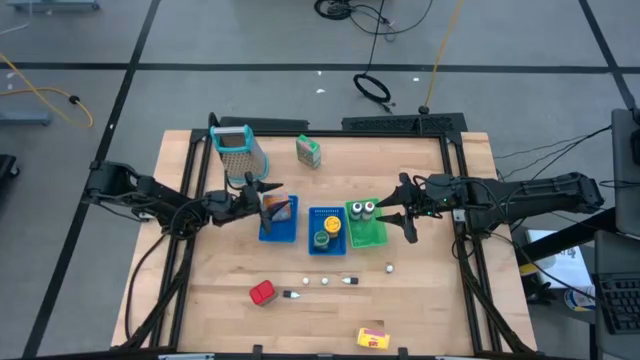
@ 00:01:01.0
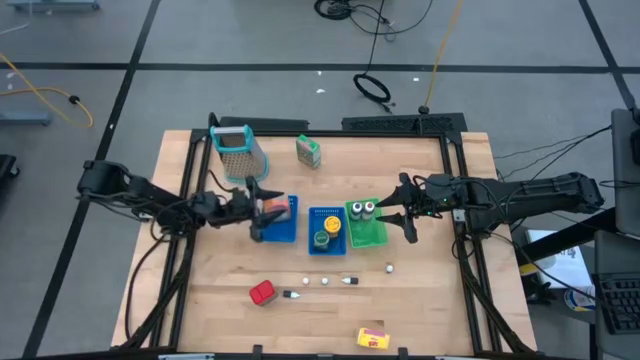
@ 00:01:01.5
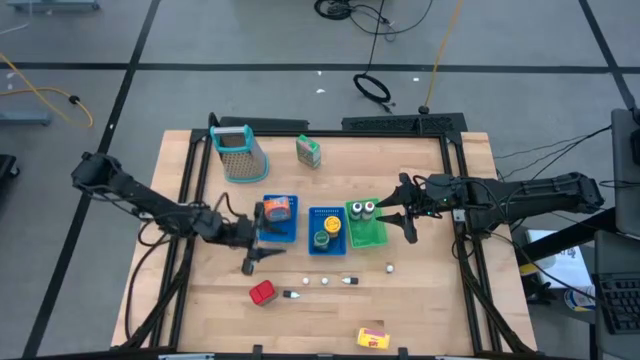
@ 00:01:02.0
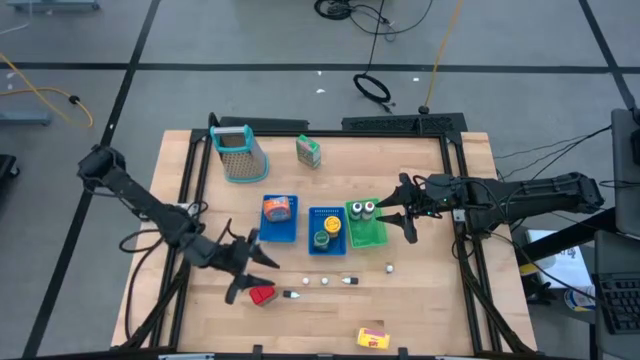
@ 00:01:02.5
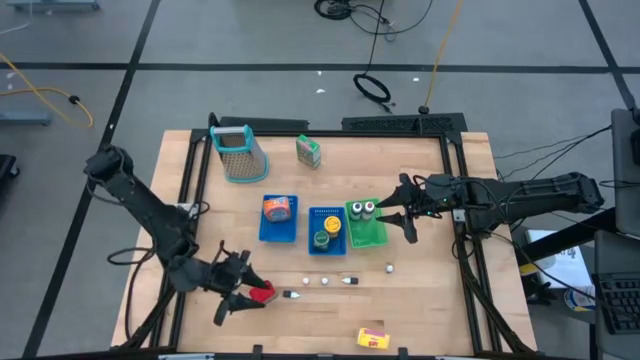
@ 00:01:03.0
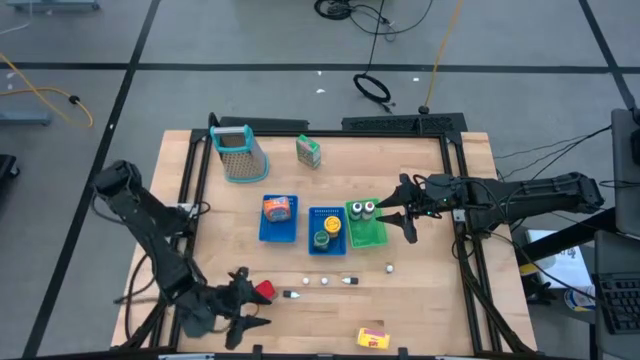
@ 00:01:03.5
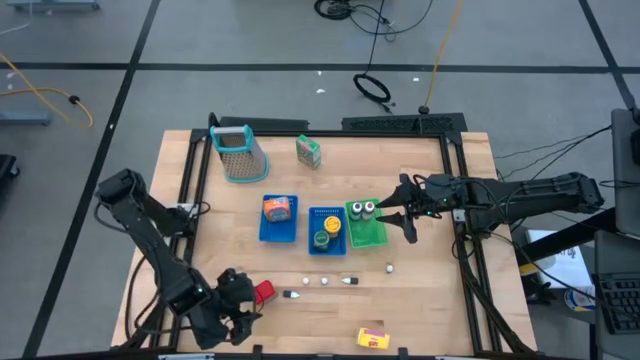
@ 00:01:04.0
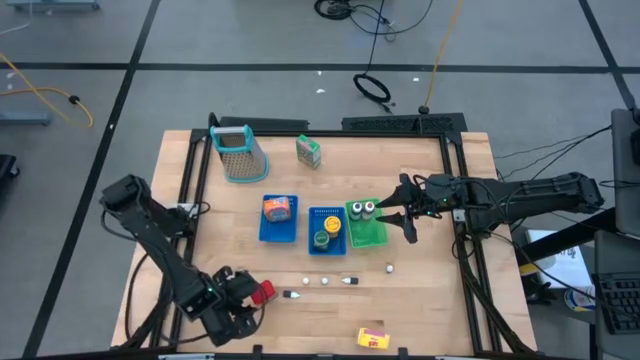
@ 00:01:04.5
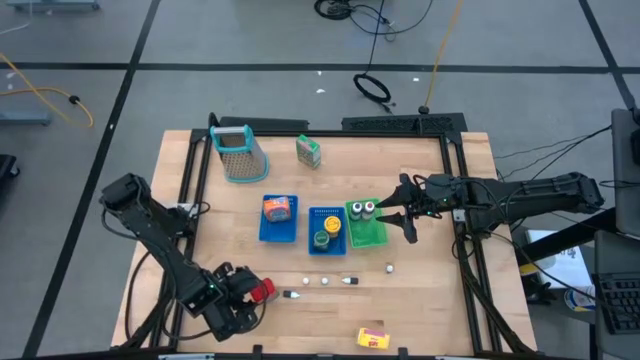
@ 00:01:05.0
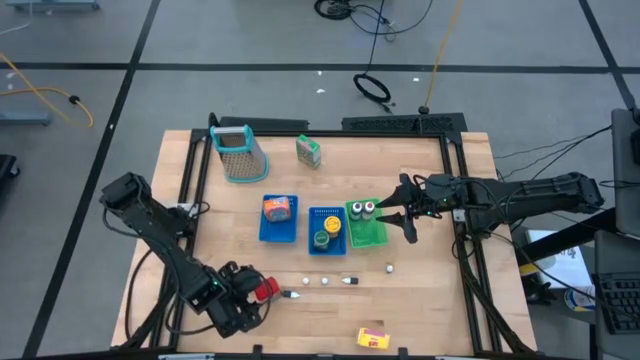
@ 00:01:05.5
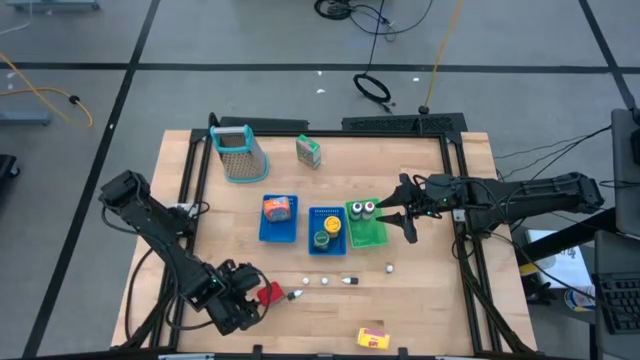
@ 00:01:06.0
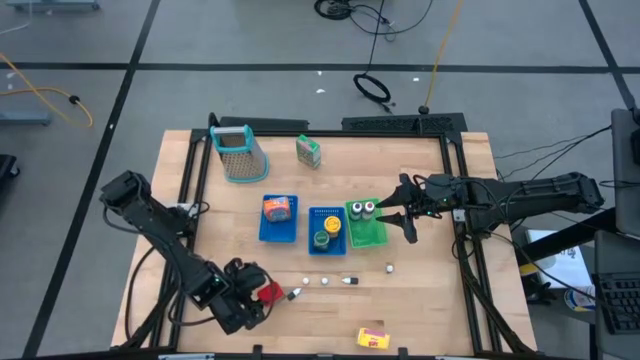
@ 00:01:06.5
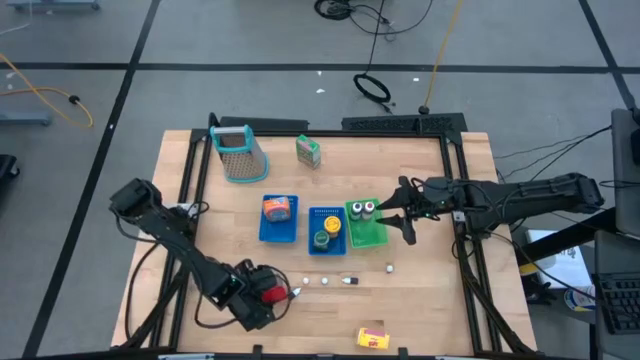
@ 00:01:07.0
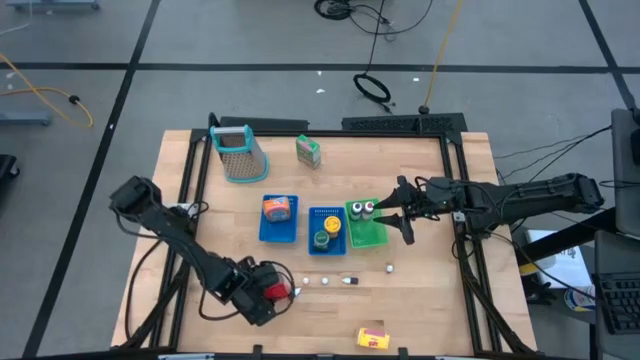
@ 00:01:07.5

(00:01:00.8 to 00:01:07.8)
Task: Pick & Place Kitchen Items
Put the red spice can into the right blue bin

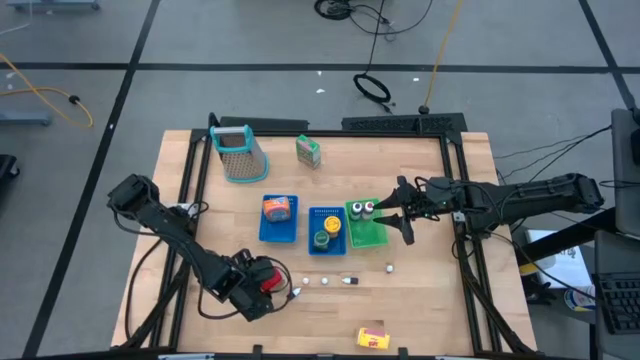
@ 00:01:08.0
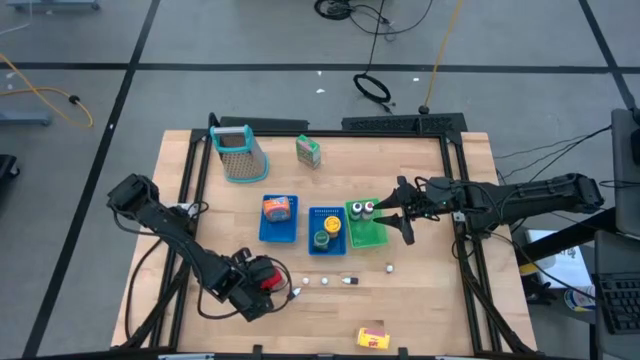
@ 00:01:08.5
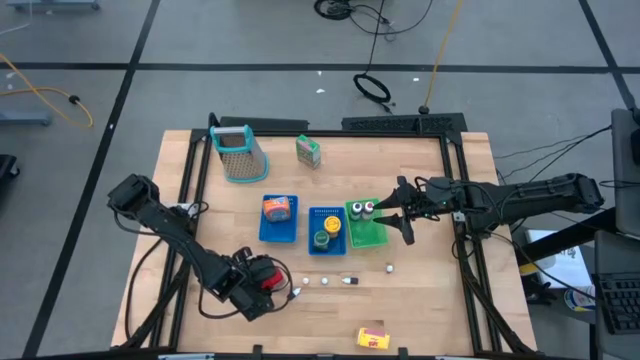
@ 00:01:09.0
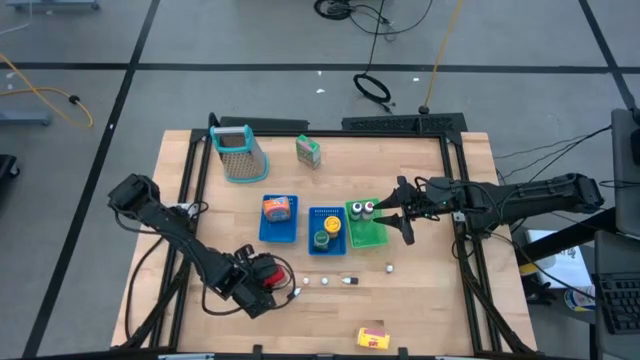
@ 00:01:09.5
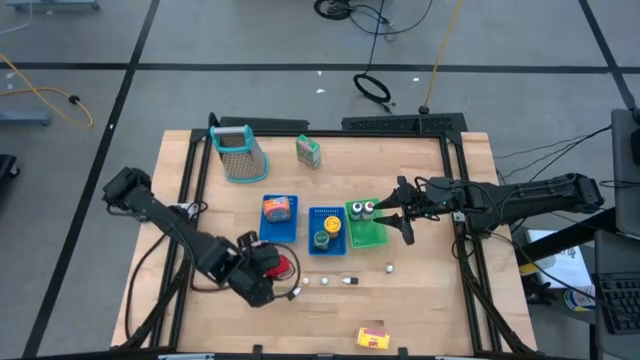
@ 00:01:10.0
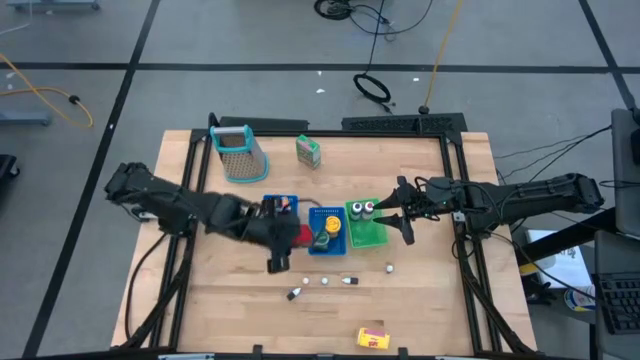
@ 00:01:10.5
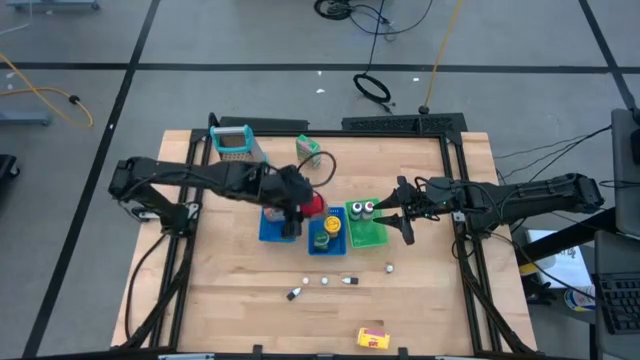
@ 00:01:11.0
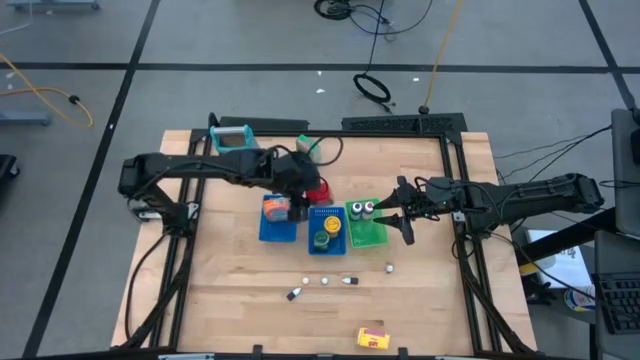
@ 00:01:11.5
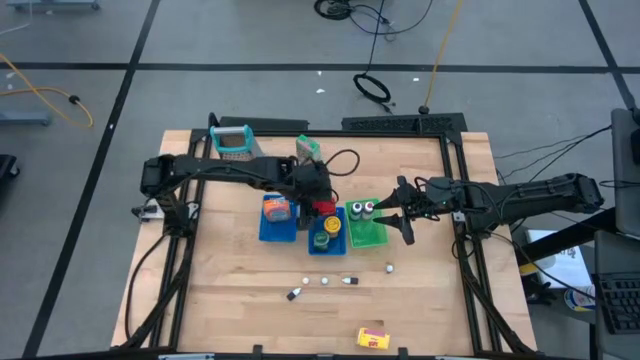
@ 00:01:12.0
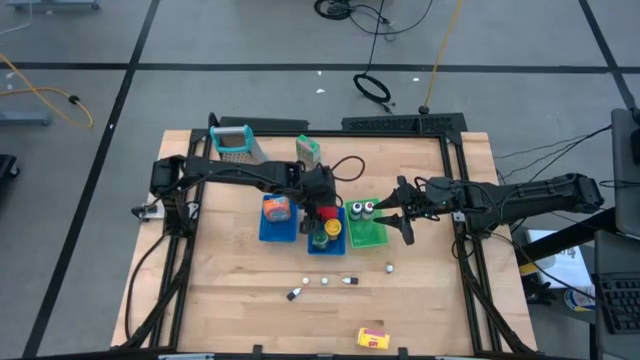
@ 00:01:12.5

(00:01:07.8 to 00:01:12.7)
Put the red spice can into the right blue bin

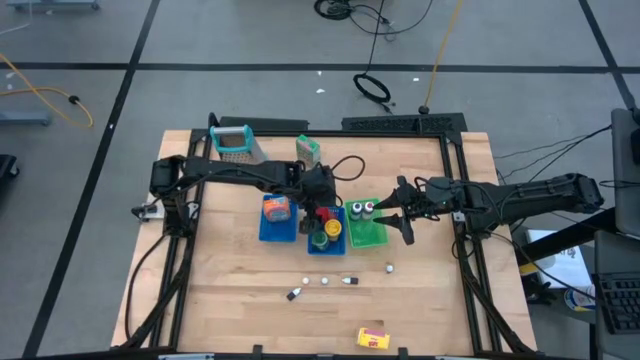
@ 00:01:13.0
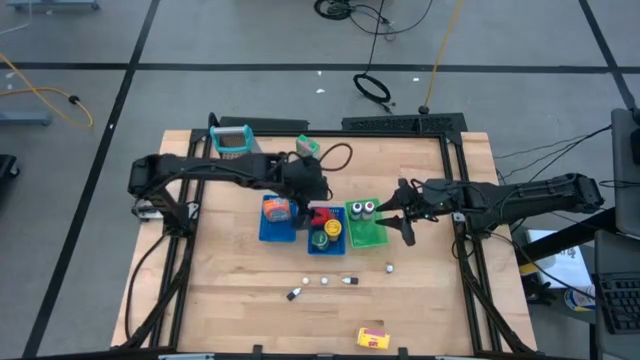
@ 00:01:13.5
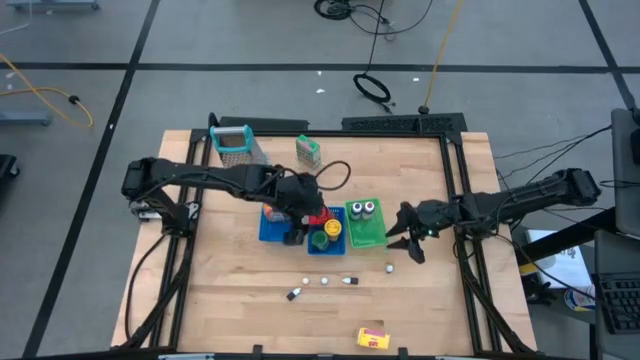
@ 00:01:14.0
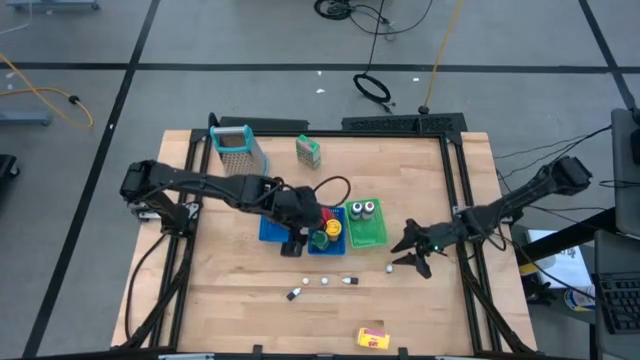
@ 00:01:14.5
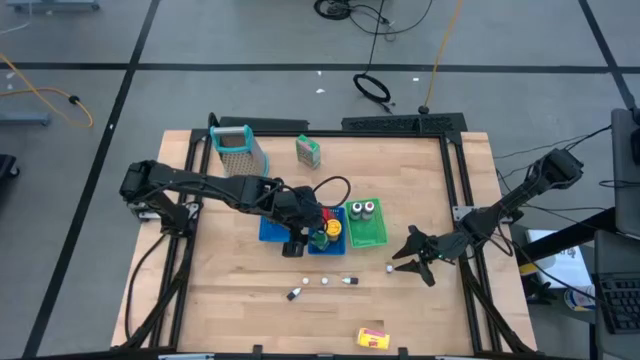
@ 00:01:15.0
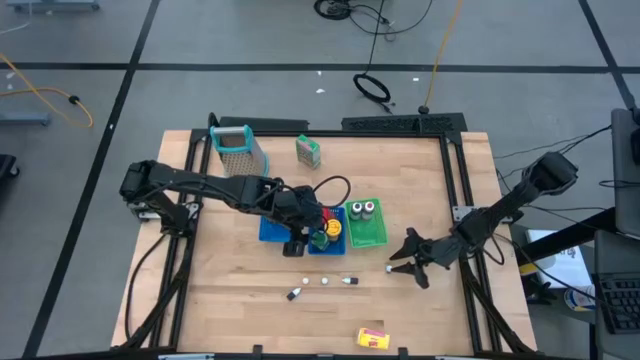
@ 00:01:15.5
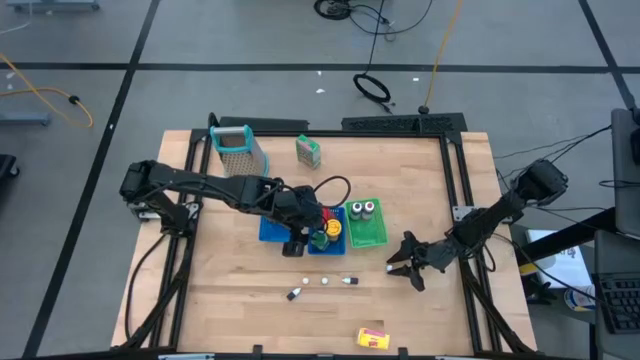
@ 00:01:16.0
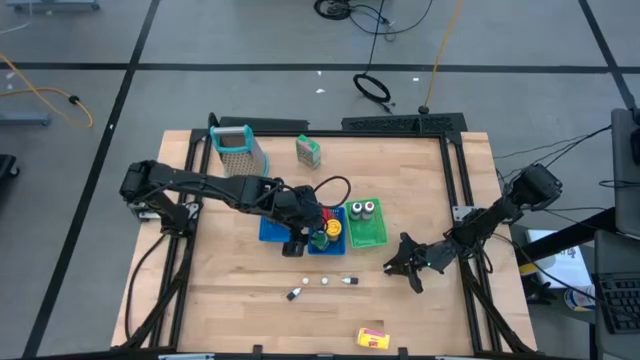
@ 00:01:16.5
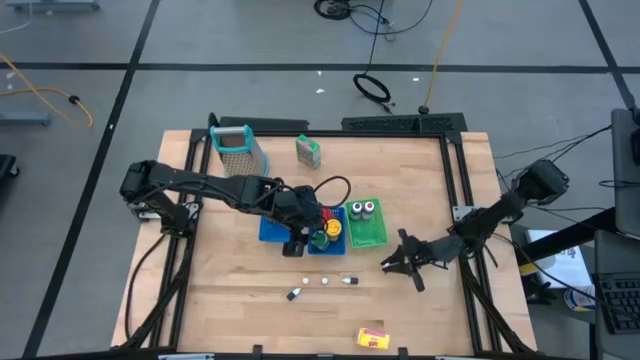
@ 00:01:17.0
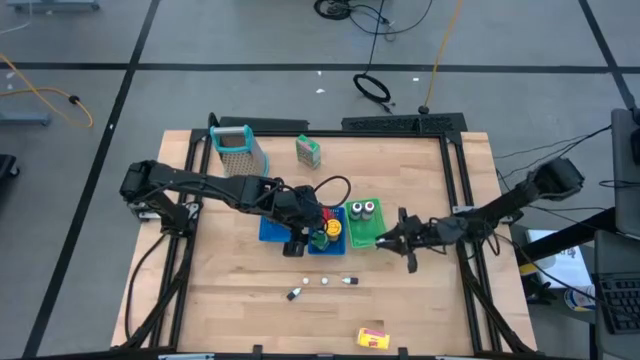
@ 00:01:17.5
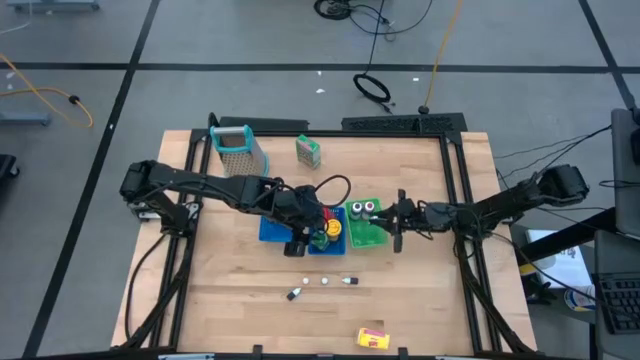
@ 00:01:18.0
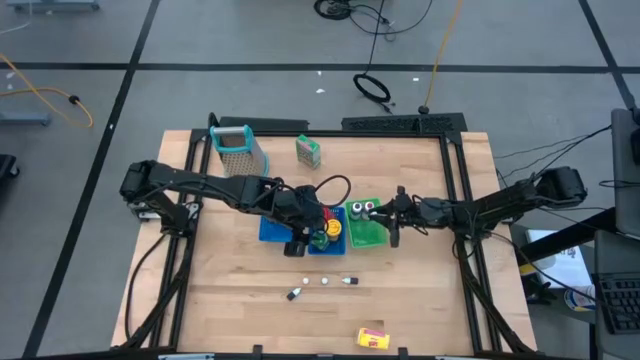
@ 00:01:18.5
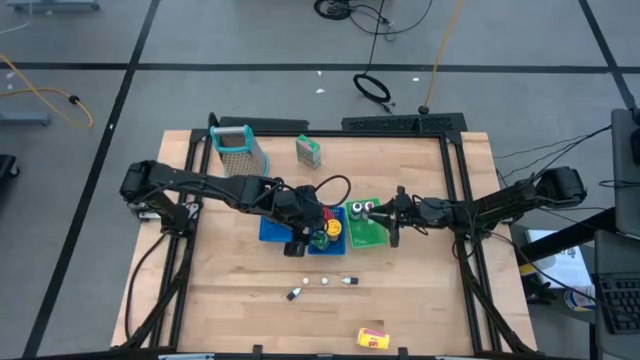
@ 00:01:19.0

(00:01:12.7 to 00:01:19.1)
Put the top small purple food color into the green bin

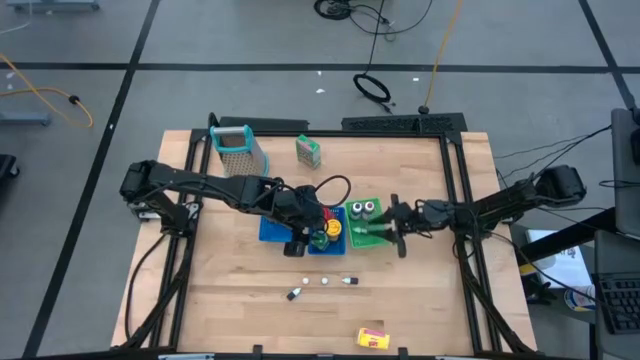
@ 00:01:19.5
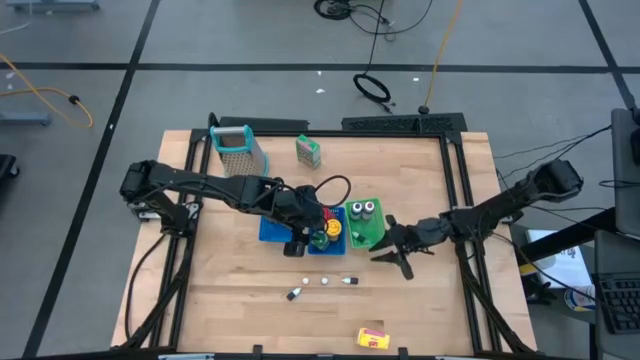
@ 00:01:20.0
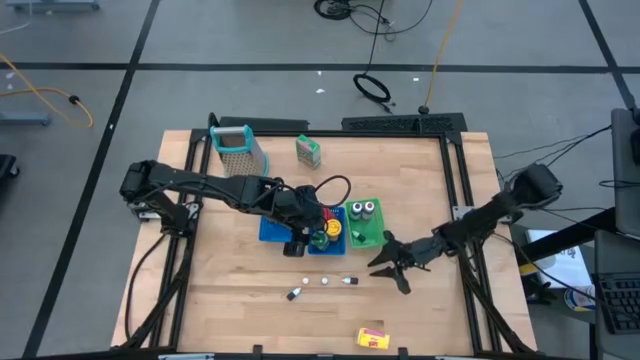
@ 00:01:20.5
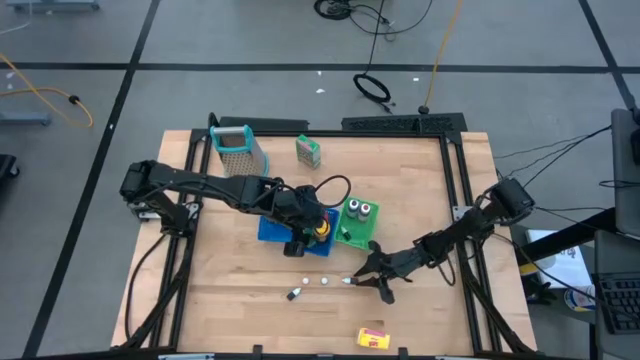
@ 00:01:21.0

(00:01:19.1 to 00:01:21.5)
Put the red food color into the green bin
